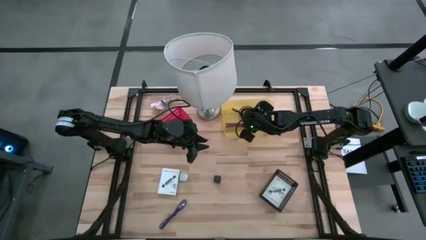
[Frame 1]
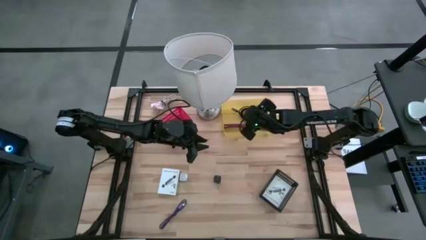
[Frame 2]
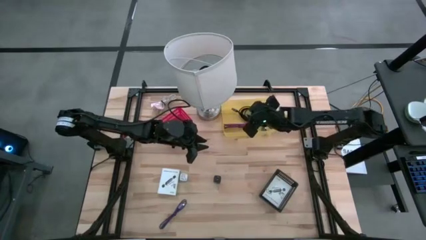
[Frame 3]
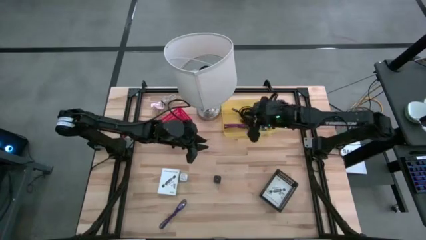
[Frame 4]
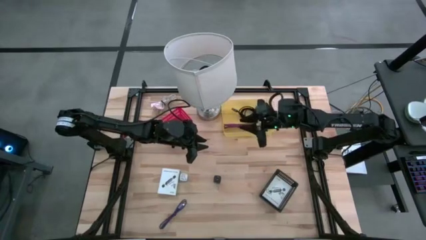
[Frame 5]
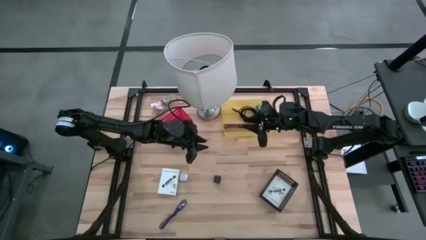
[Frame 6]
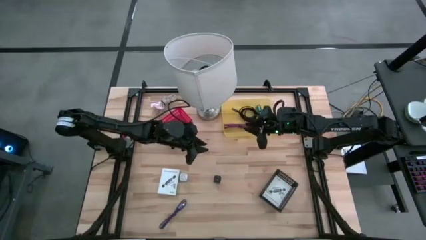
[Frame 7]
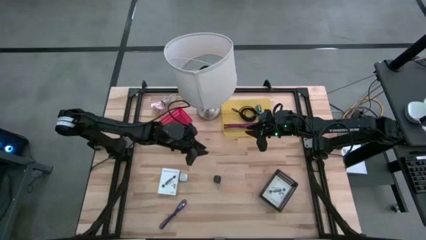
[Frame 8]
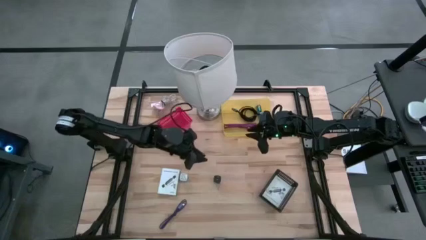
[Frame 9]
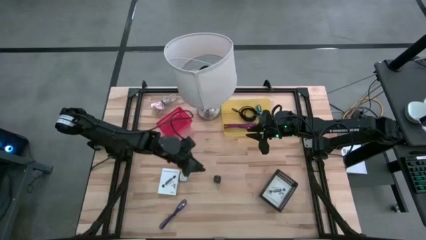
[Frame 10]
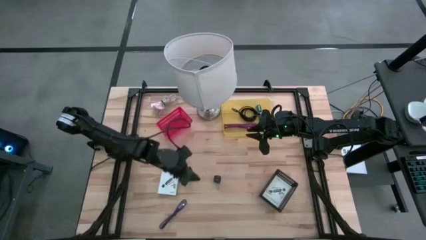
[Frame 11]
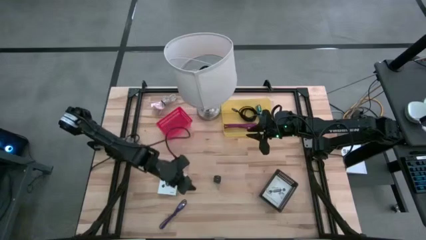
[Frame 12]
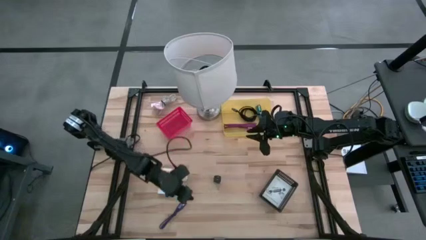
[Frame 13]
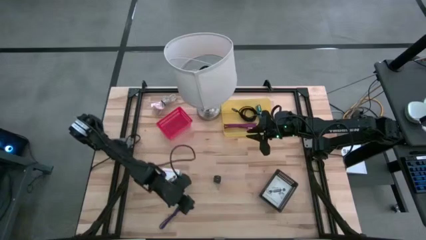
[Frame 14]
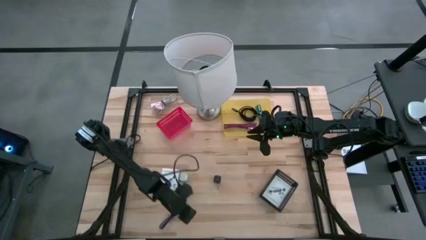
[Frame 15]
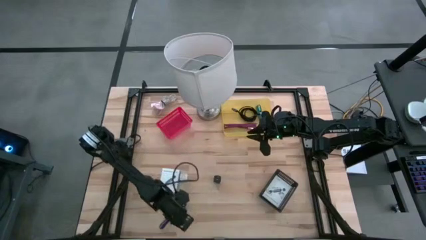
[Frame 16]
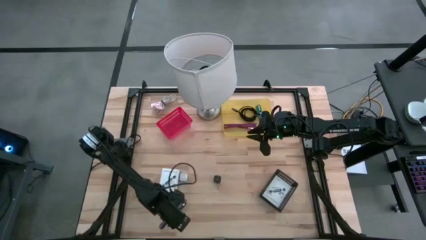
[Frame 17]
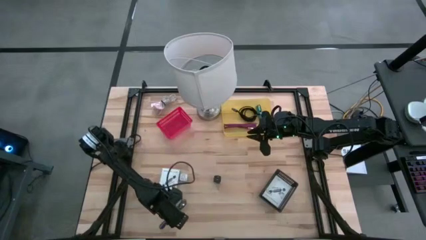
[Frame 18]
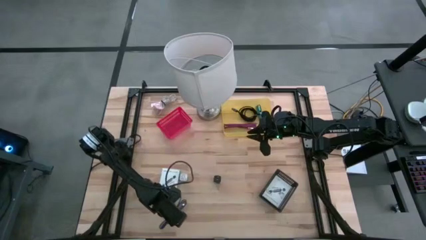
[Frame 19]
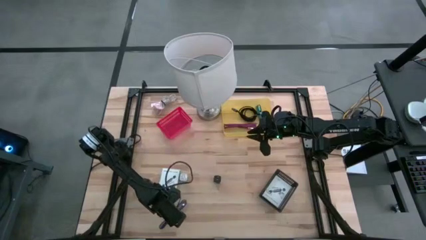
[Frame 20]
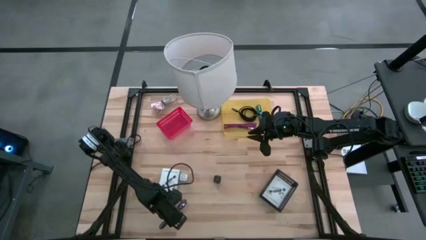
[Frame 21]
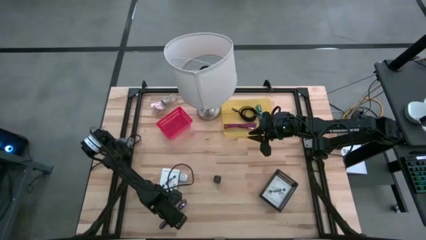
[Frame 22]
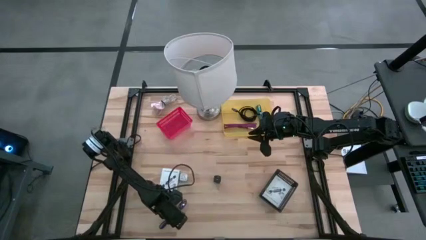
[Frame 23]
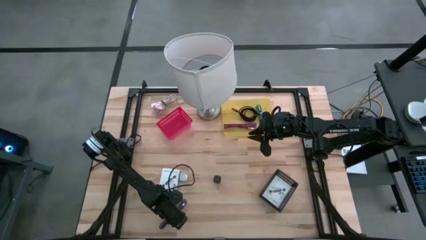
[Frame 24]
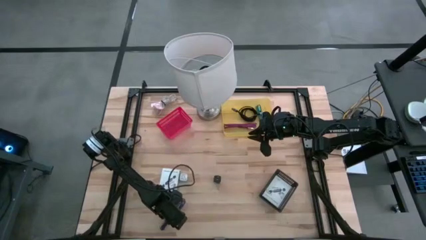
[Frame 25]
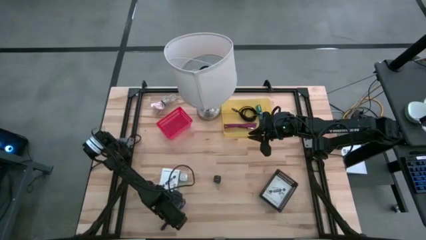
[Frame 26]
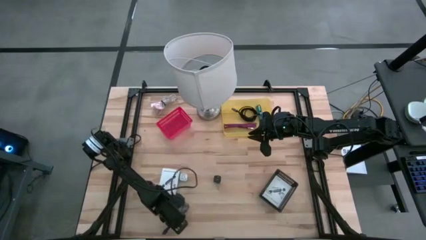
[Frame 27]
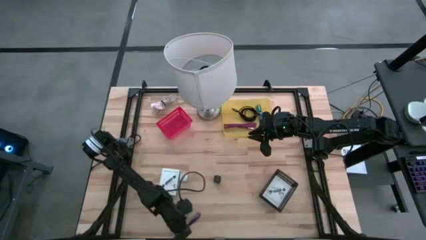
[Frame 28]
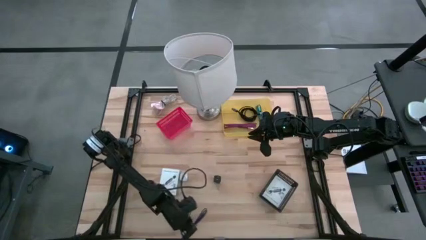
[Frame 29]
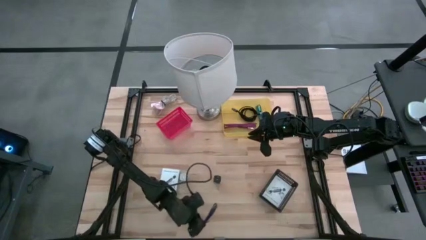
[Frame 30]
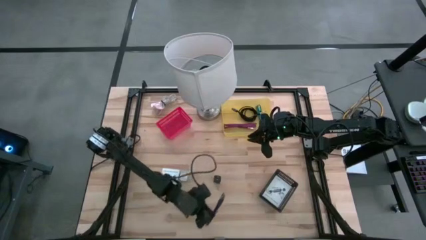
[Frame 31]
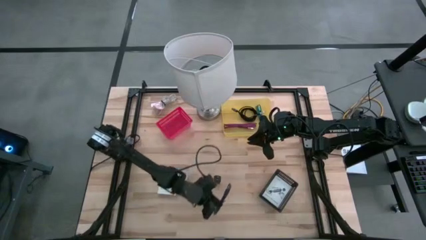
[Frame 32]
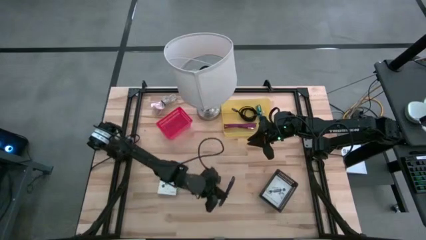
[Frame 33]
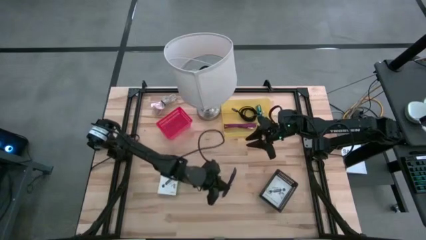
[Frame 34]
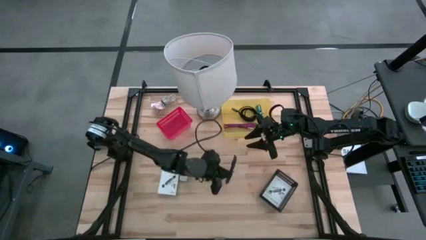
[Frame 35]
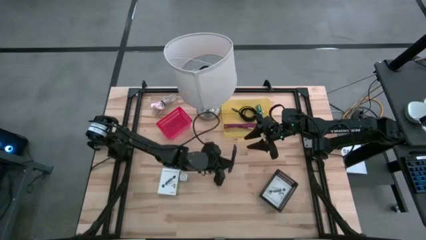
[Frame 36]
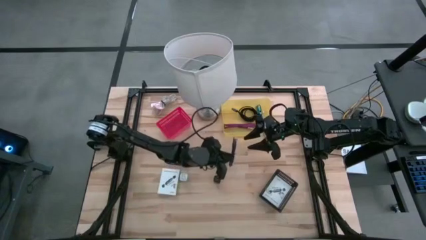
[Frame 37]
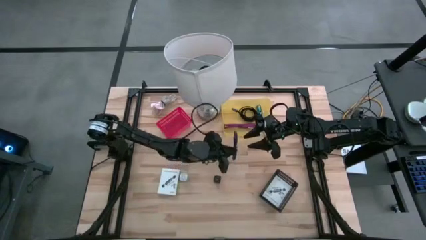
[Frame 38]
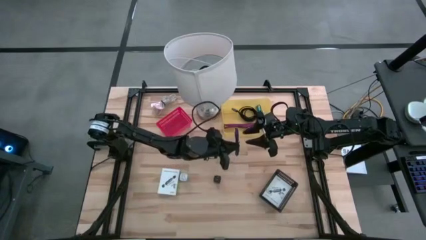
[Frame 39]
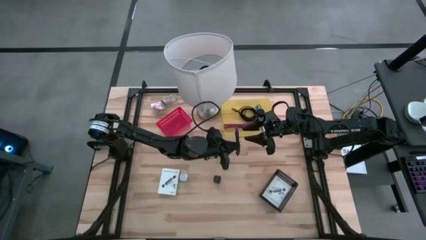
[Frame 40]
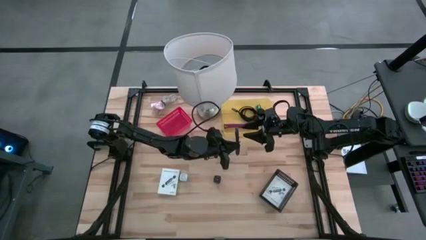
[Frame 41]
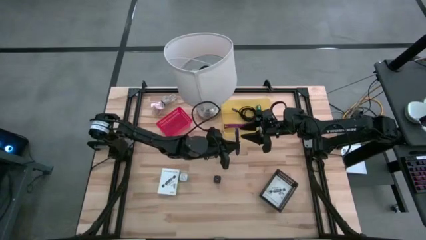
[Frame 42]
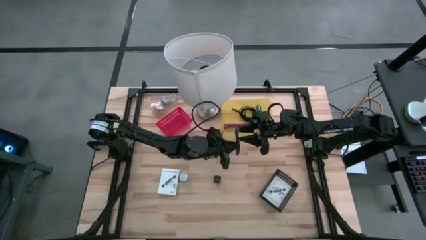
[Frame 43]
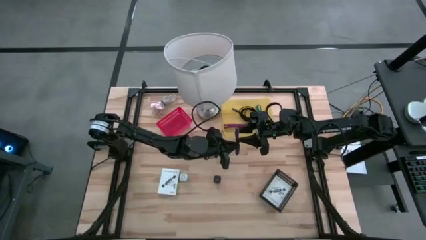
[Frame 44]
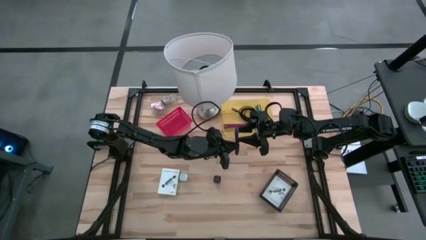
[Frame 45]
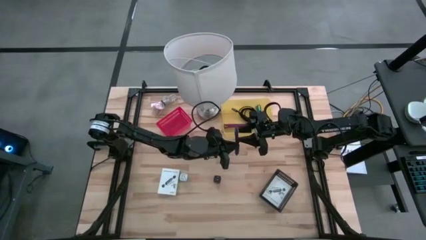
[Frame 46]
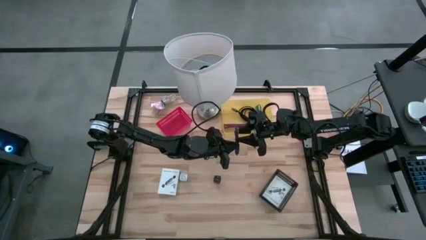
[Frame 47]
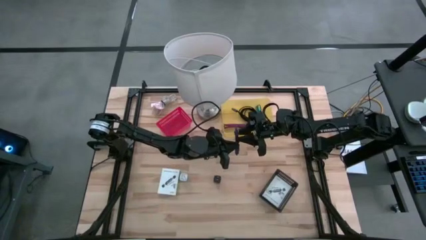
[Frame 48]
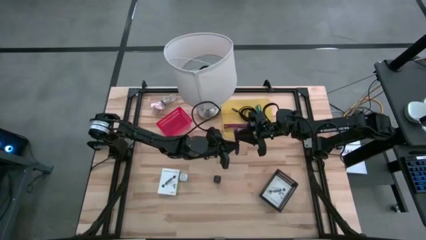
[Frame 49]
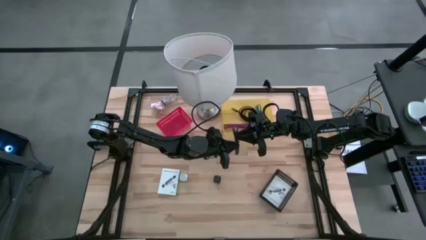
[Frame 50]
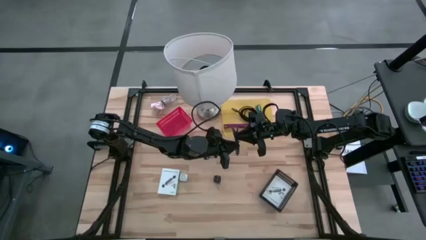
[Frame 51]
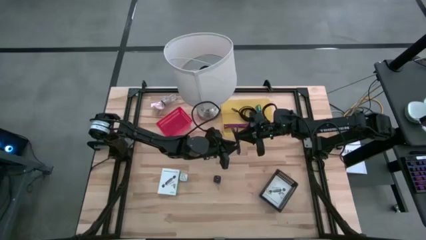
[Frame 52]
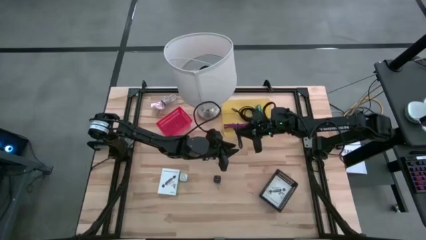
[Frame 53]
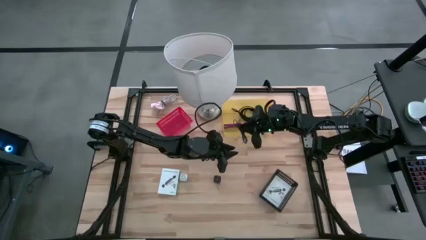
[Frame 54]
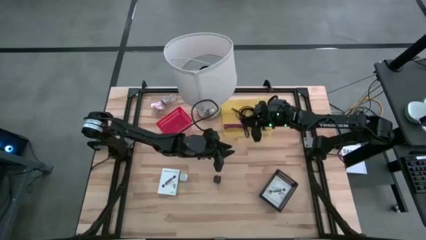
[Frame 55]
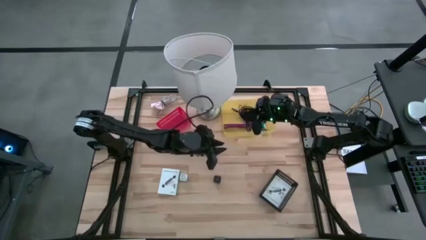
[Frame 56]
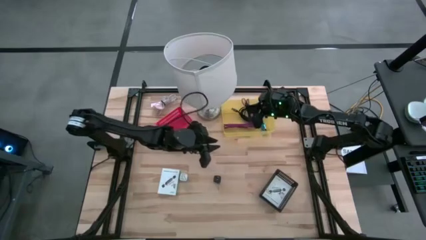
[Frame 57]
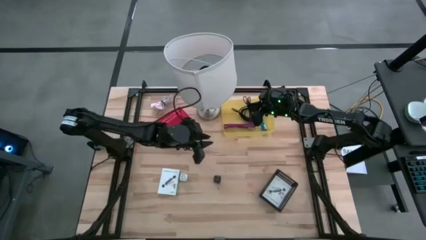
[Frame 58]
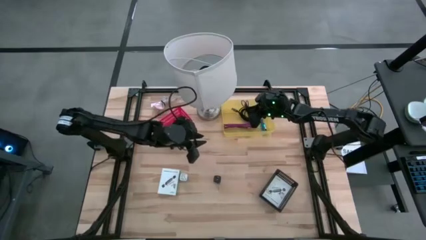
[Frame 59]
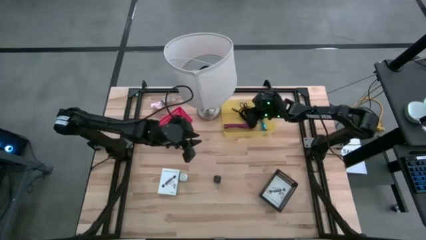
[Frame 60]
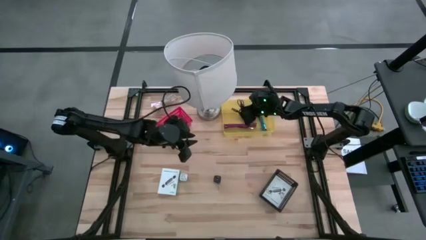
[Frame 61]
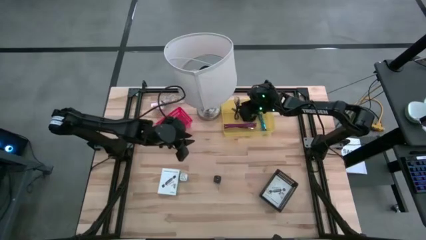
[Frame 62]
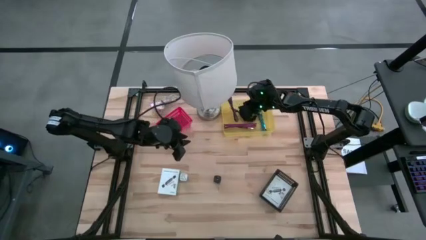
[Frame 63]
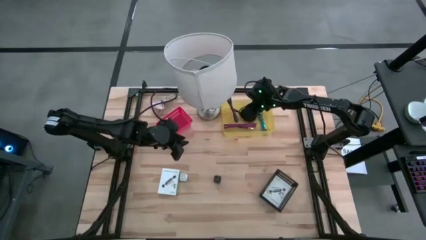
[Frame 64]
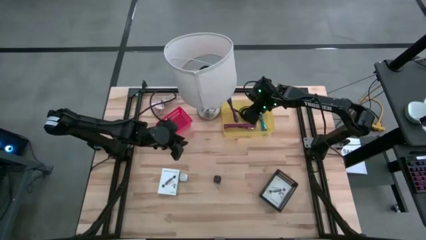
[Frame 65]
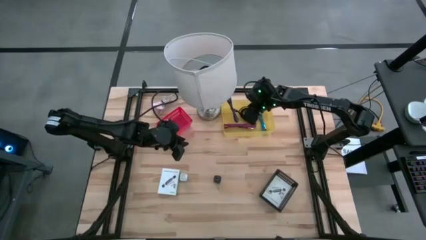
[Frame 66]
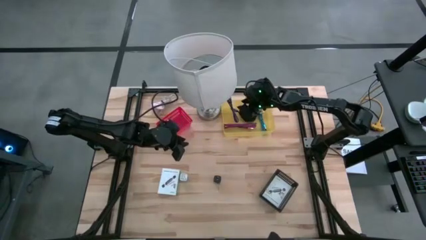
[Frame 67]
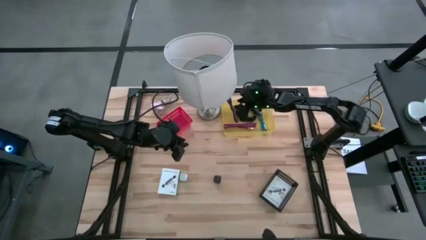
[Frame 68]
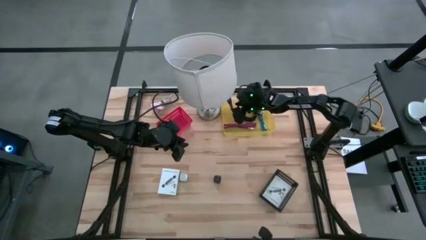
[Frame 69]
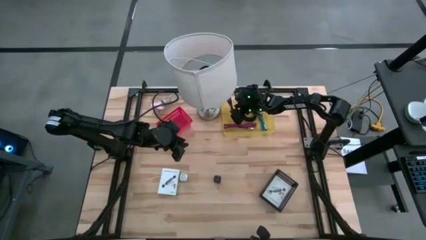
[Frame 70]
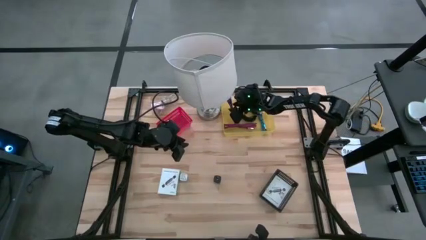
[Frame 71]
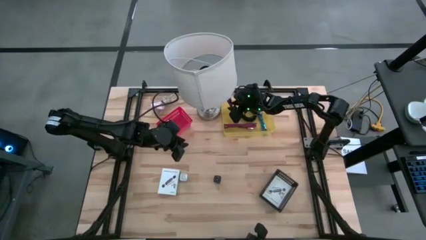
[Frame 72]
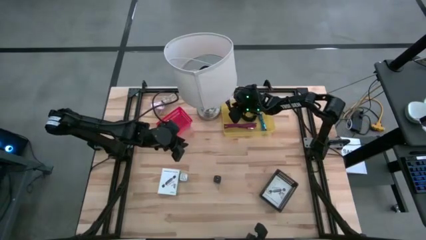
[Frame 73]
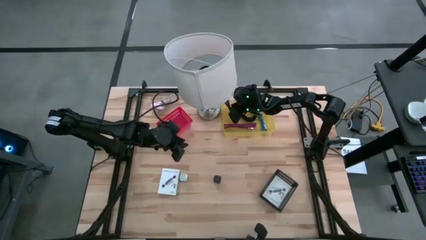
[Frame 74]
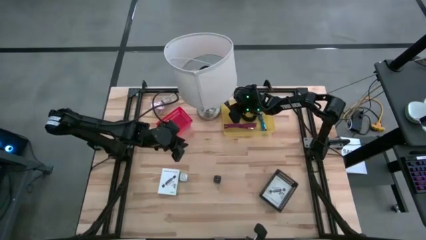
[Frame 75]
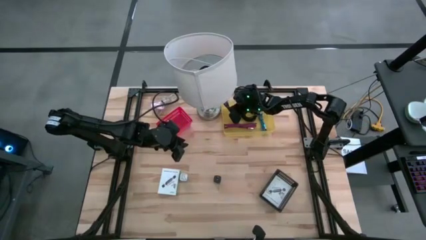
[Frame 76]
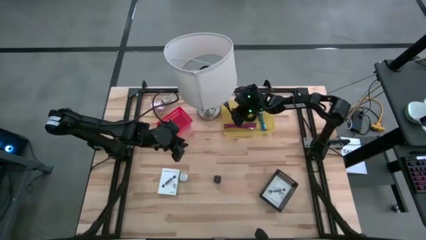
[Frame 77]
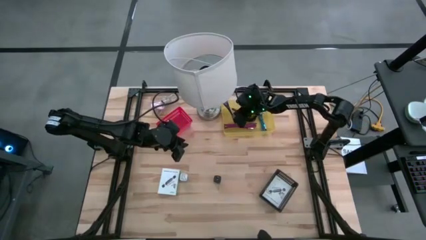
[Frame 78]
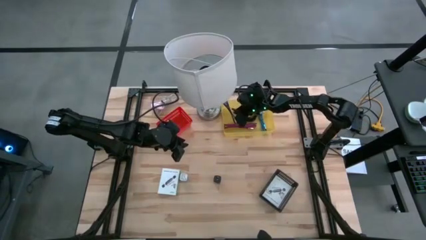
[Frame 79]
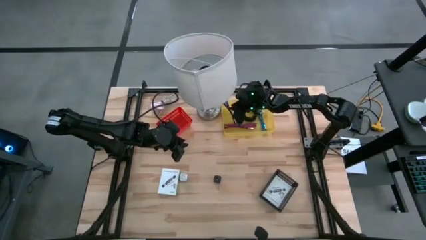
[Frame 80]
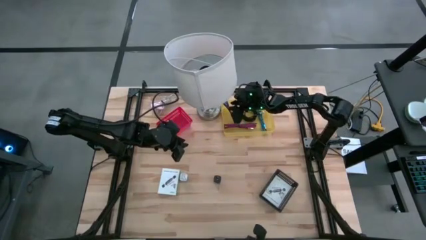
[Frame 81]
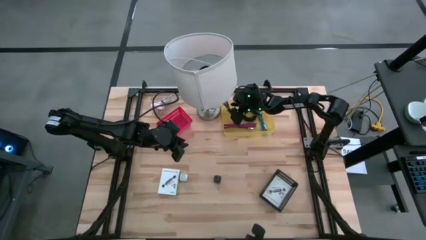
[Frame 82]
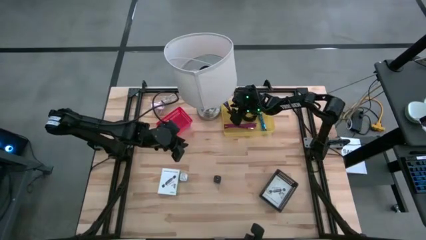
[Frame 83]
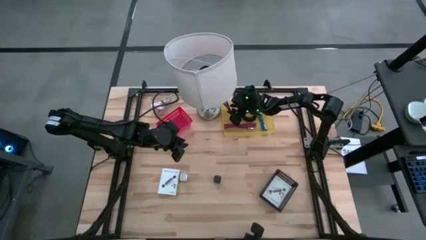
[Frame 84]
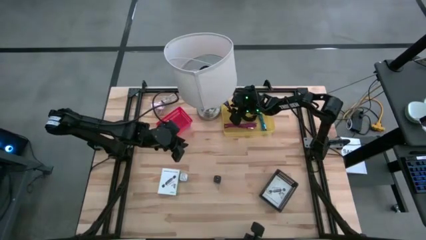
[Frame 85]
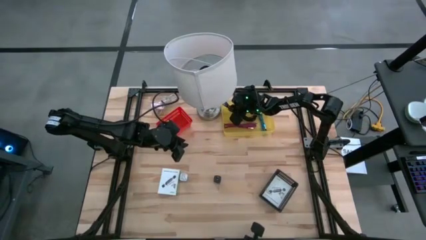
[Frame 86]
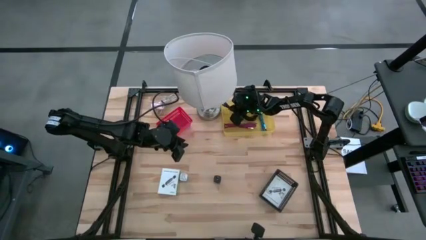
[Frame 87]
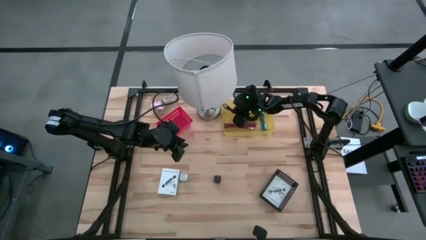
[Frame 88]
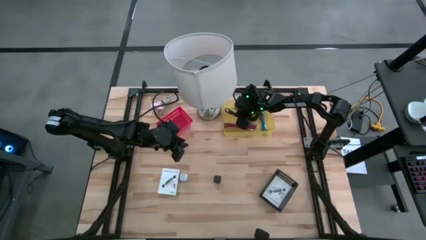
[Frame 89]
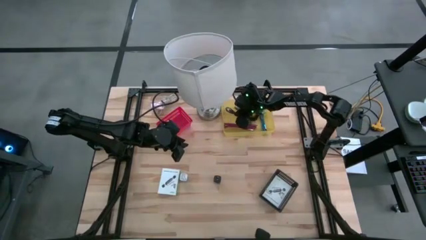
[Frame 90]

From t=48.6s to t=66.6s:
Task: Pick and place items into bin
Put the violet charger cable into the yellow bin
